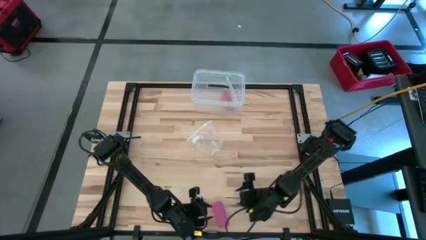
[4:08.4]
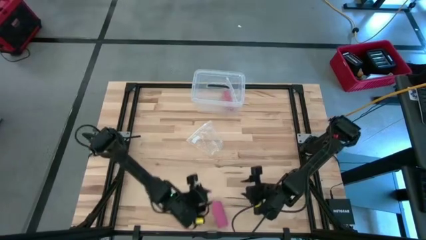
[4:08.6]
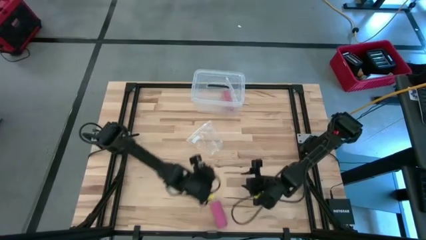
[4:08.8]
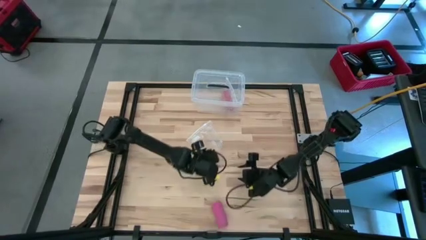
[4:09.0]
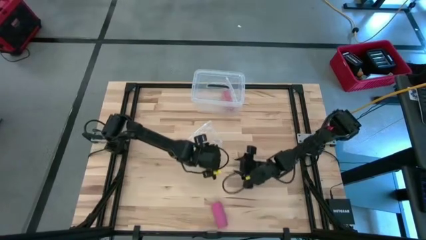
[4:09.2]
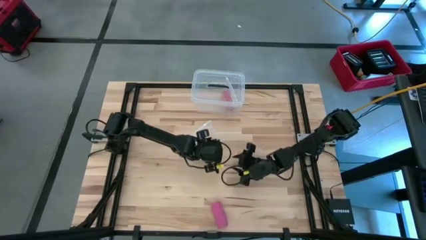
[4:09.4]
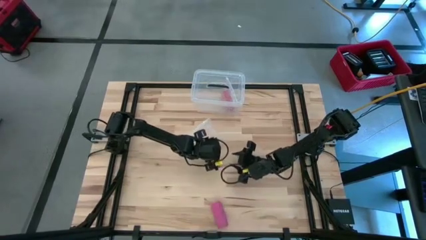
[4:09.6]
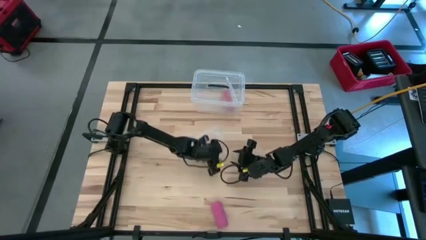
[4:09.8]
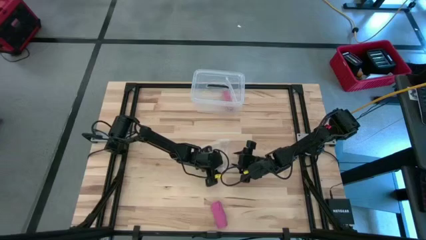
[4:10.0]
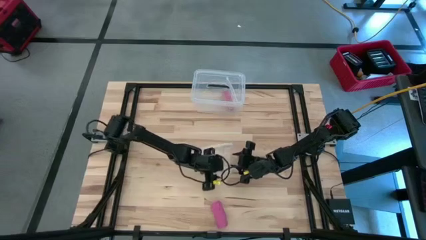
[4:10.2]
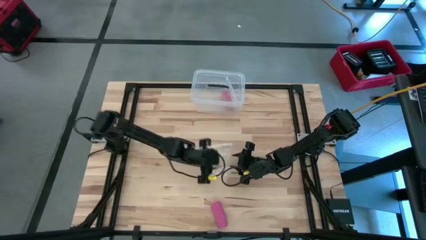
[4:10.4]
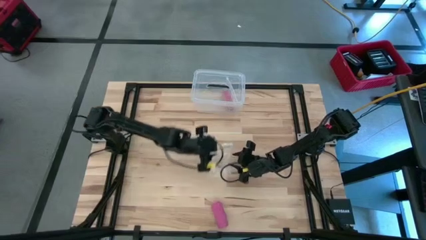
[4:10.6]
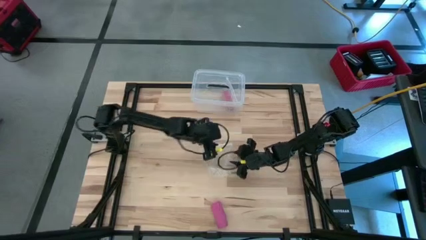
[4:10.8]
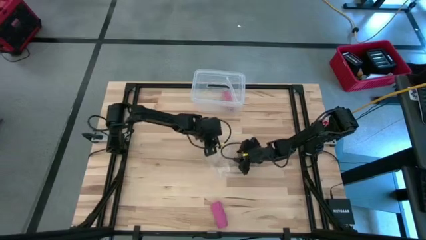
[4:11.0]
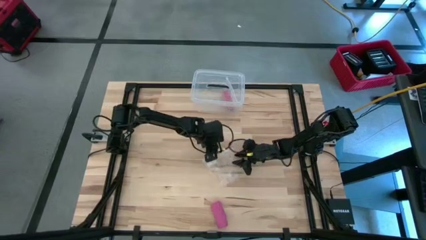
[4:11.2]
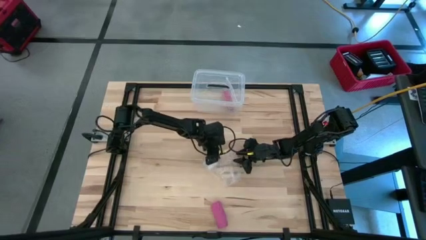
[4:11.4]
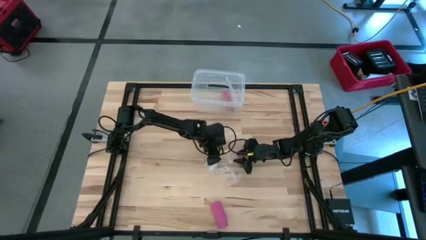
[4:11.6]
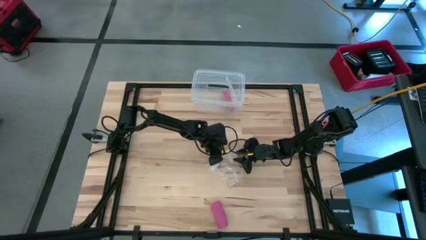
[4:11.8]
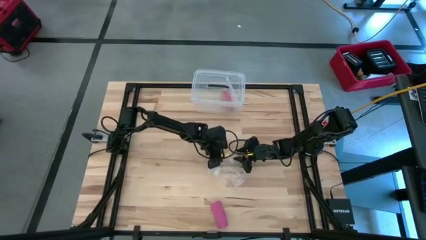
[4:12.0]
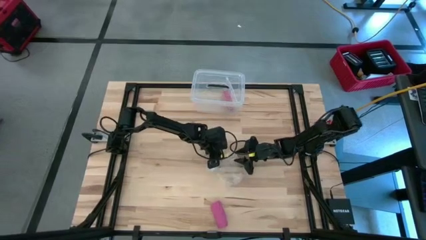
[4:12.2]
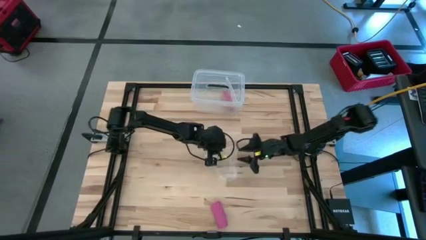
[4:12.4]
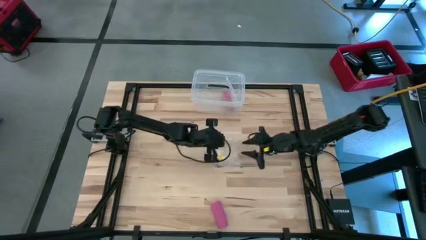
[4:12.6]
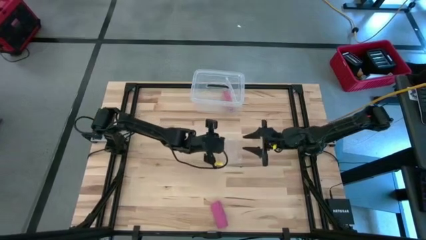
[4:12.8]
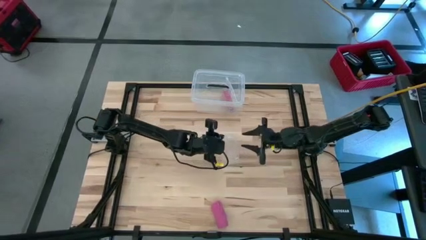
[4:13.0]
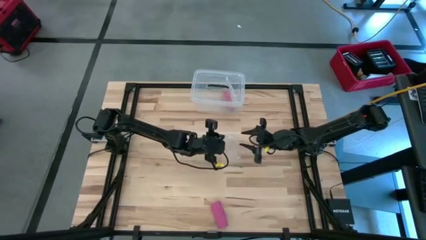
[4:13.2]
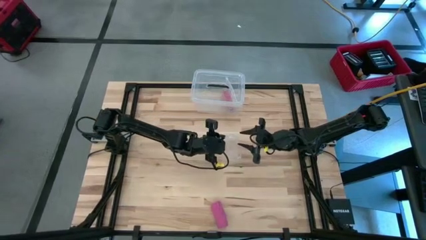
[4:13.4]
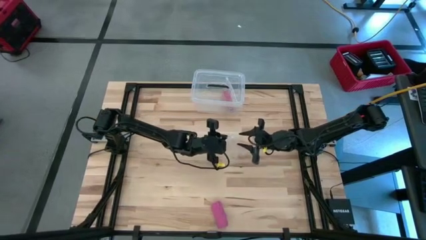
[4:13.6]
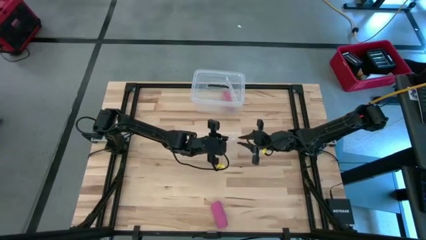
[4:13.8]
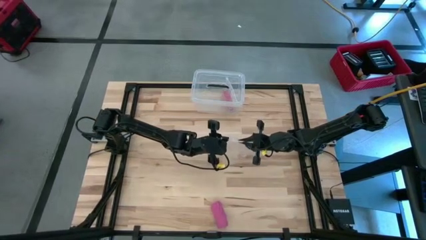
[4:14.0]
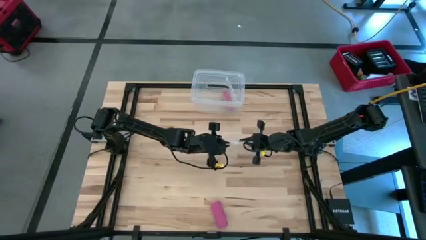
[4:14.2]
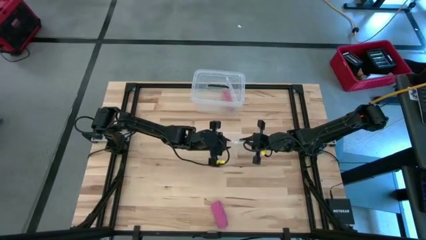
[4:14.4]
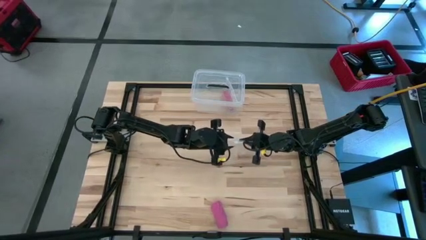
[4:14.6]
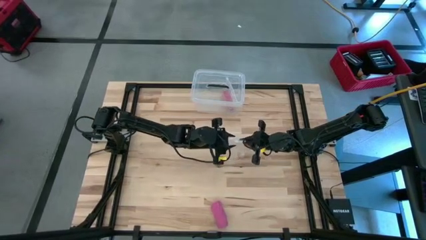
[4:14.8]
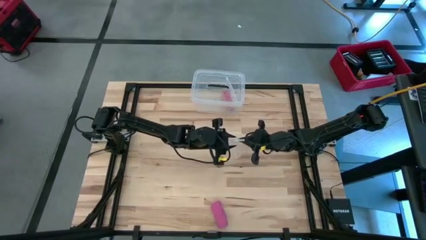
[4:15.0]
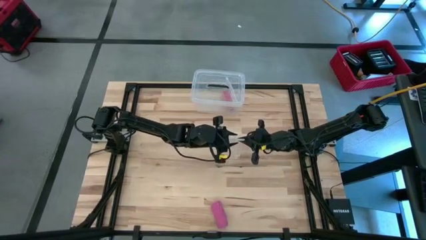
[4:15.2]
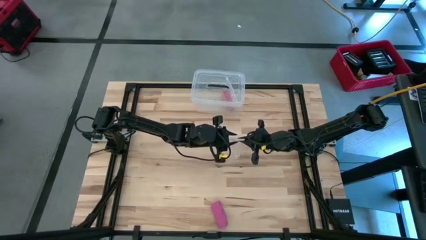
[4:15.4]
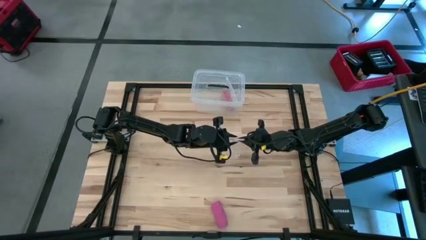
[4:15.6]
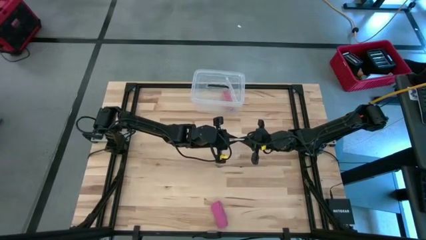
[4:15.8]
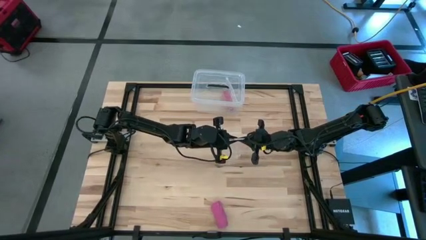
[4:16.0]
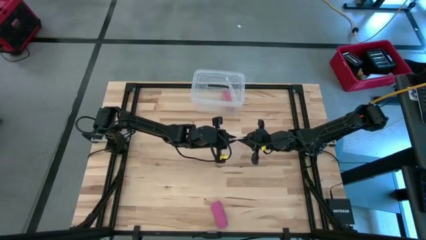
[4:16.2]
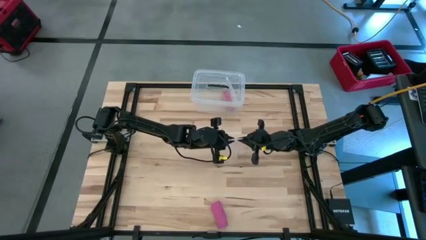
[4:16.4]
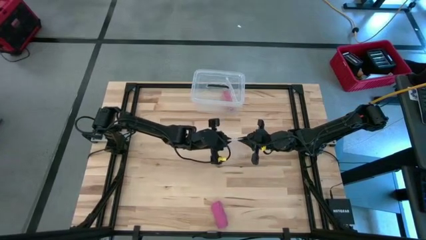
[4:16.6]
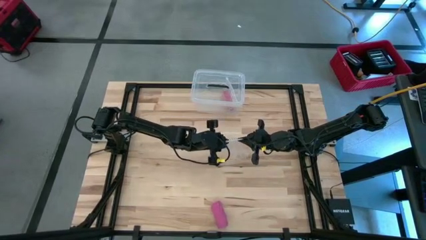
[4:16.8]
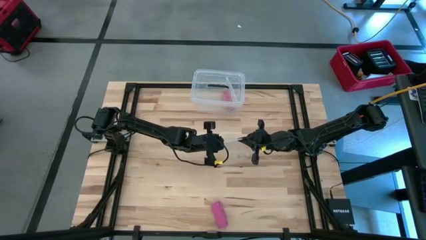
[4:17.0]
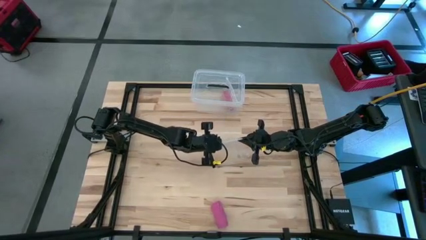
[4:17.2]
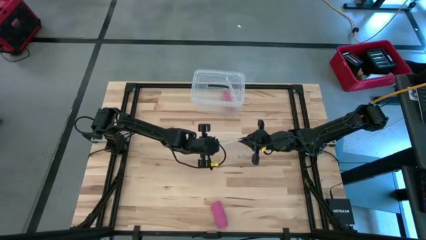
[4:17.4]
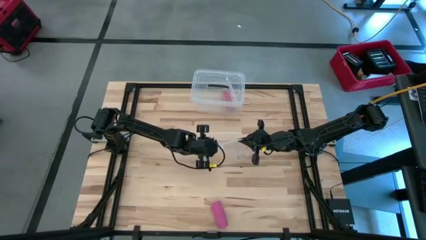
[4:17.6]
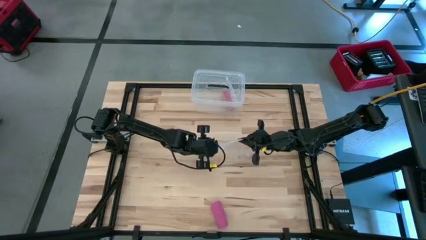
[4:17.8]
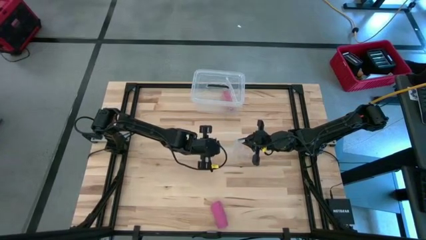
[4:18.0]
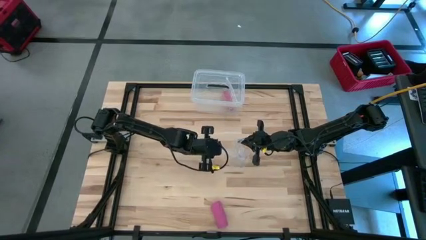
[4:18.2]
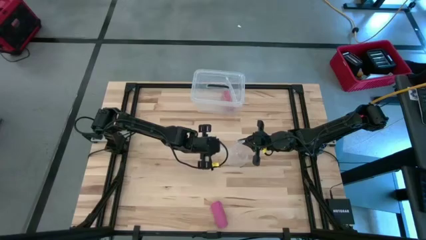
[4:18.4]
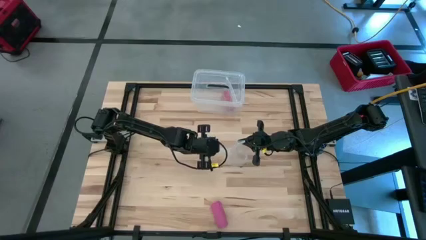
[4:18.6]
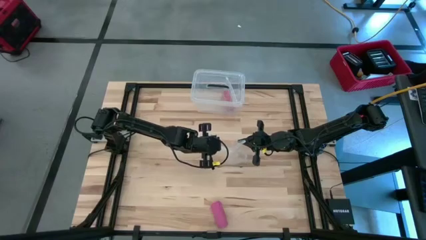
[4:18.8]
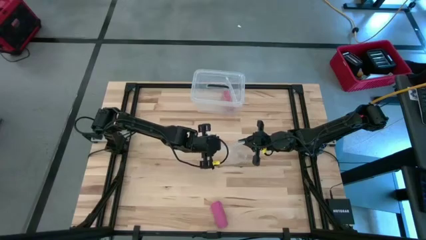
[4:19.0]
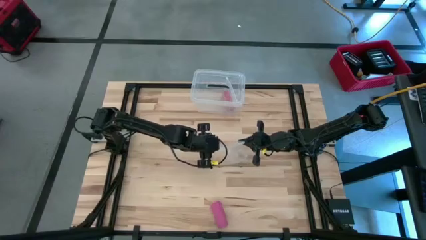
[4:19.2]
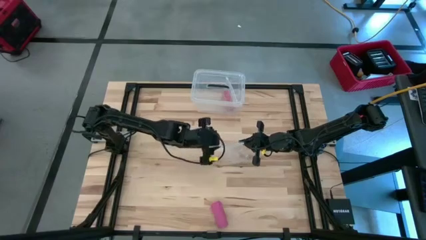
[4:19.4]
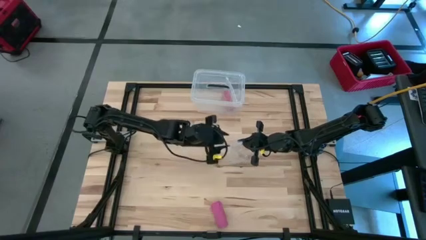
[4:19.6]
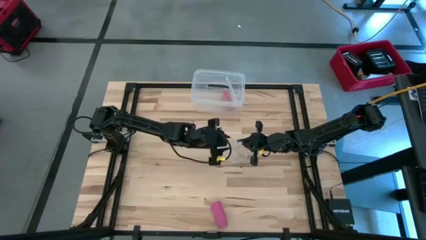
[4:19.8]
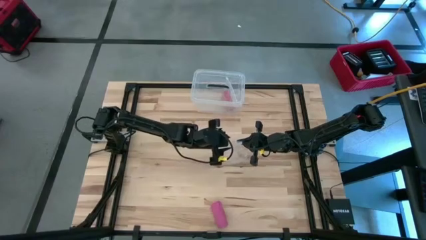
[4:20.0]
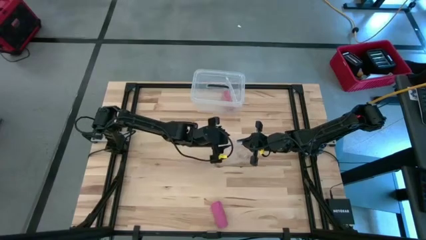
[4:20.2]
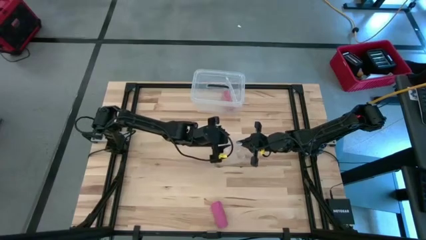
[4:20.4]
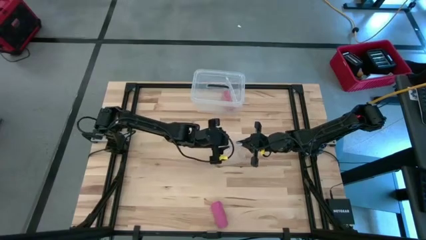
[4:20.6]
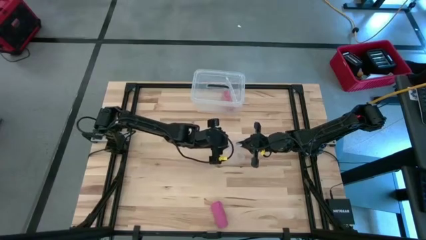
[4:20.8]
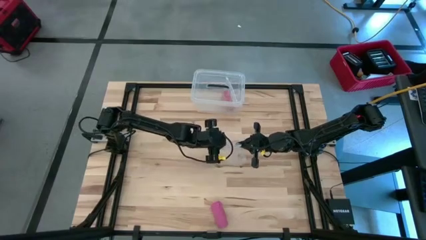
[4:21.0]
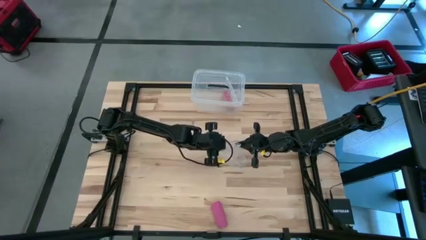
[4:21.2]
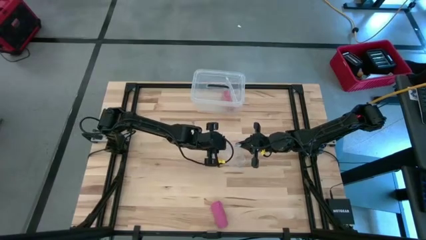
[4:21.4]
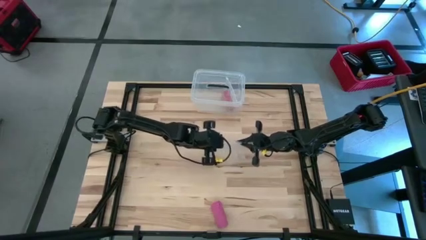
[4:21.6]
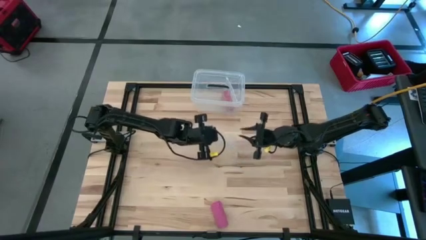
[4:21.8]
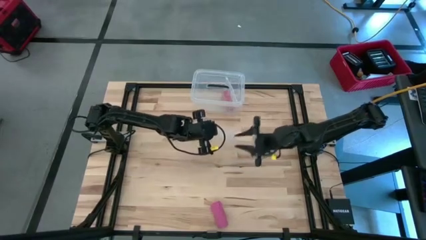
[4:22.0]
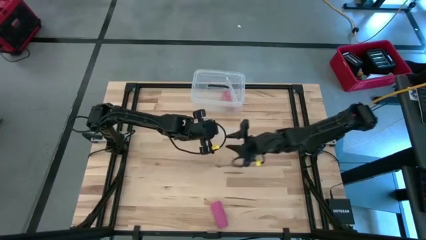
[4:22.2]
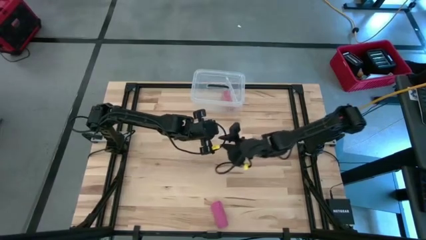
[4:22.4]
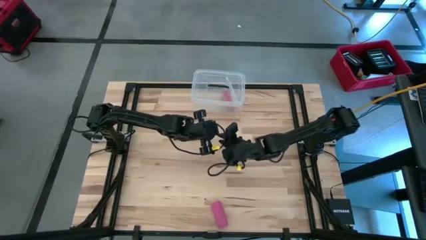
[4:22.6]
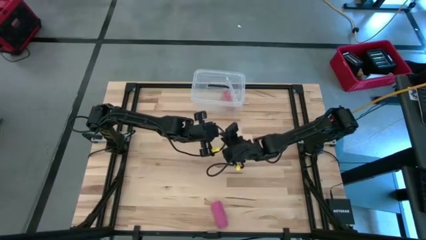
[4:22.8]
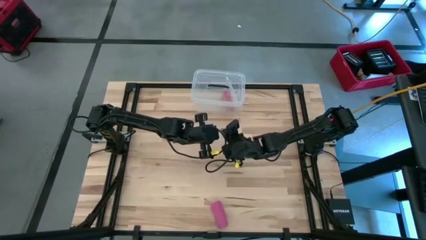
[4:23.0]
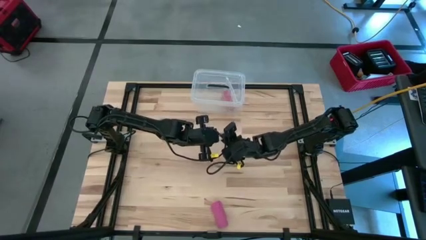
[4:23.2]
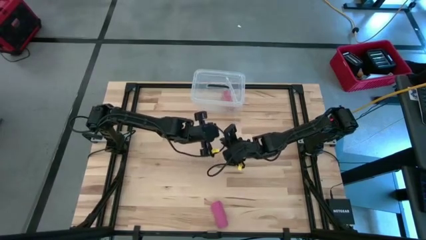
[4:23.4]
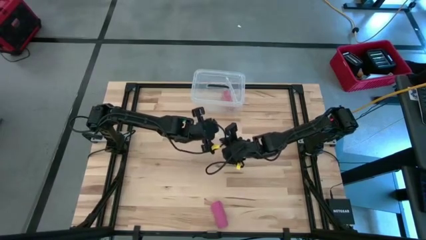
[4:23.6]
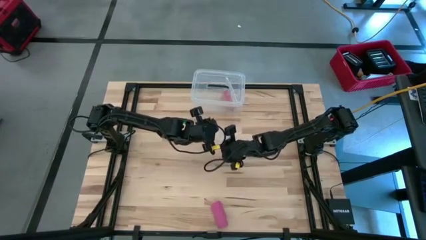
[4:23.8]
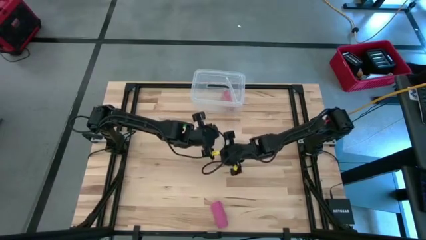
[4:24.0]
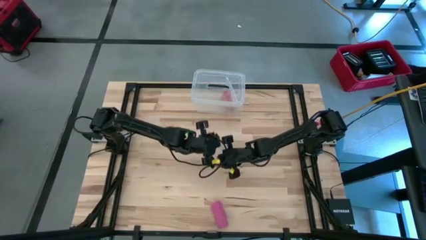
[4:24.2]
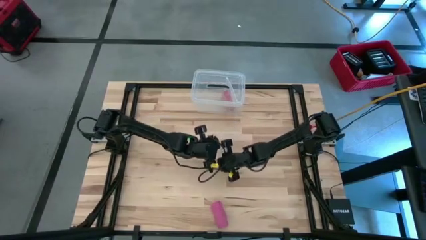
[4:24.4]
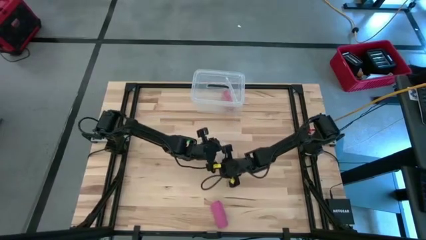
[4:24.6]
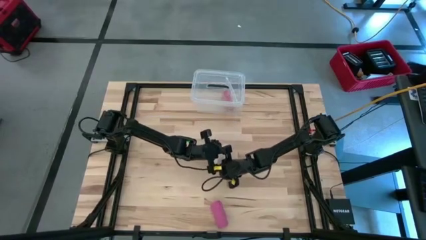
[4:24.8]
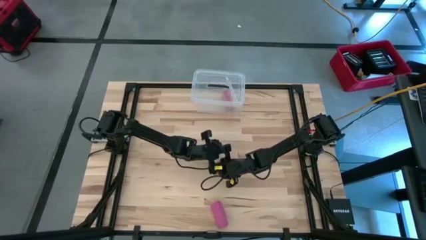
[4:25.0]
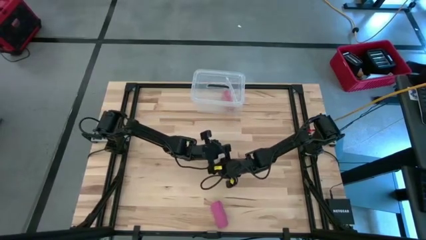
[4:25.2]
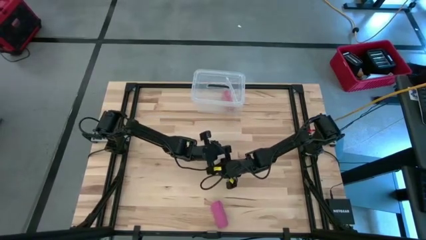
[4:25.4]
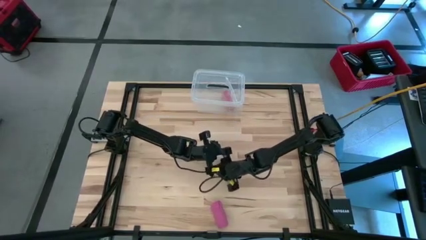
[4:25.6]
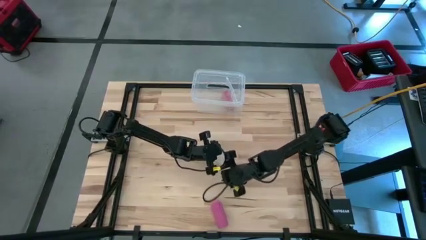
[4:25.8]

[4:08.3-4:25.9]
Task: Roll bandage
Open the transparent zip bag
